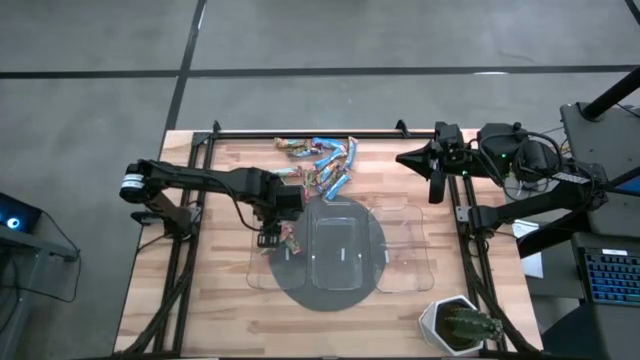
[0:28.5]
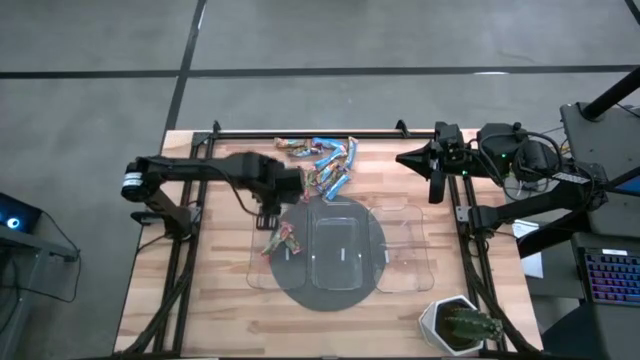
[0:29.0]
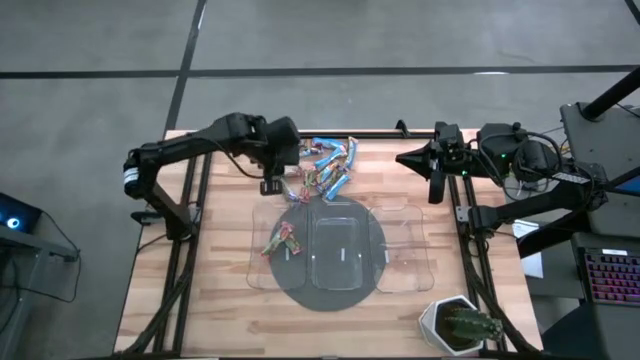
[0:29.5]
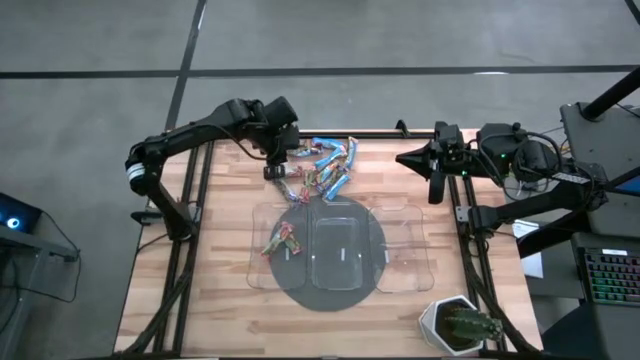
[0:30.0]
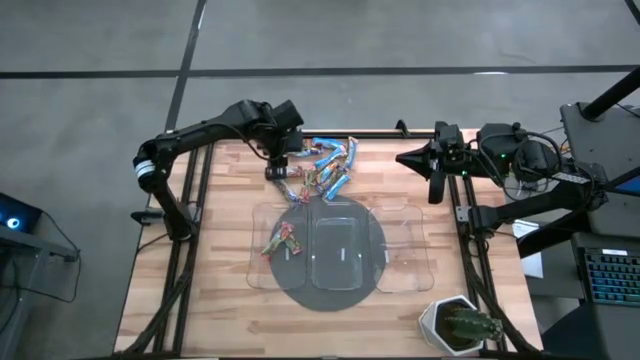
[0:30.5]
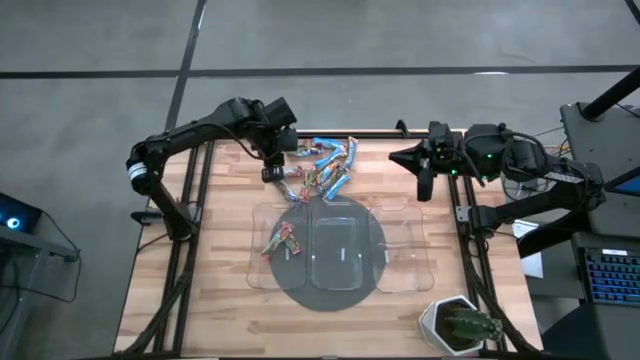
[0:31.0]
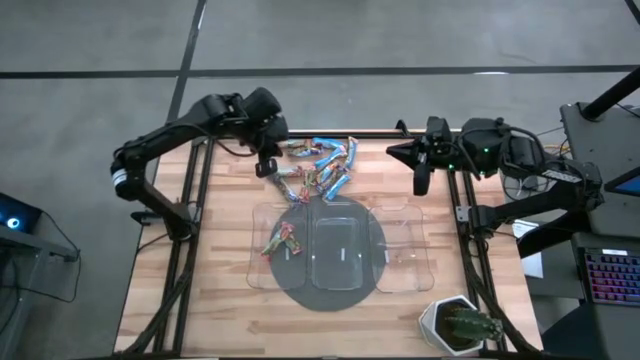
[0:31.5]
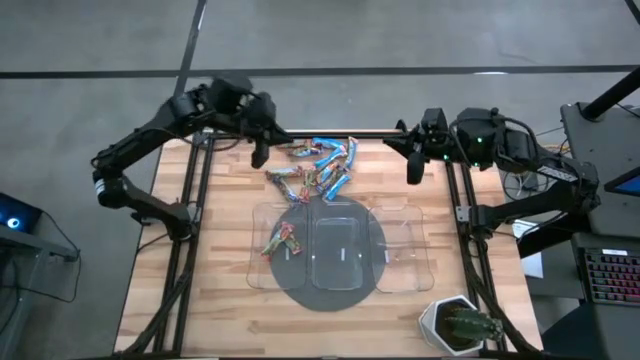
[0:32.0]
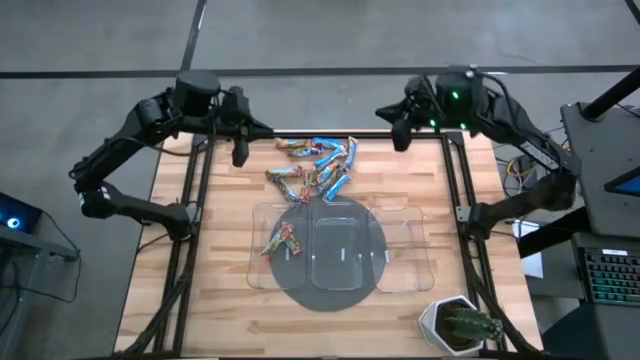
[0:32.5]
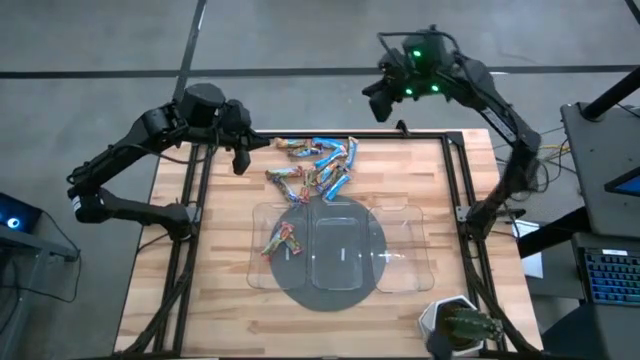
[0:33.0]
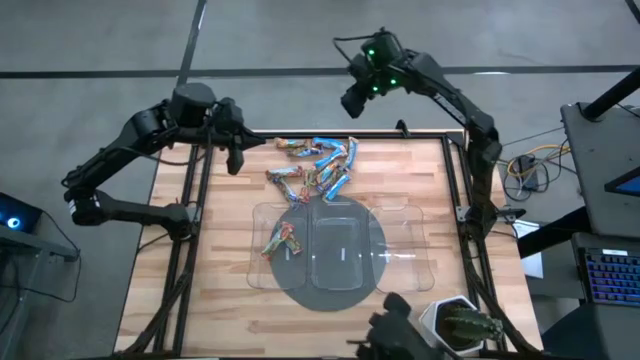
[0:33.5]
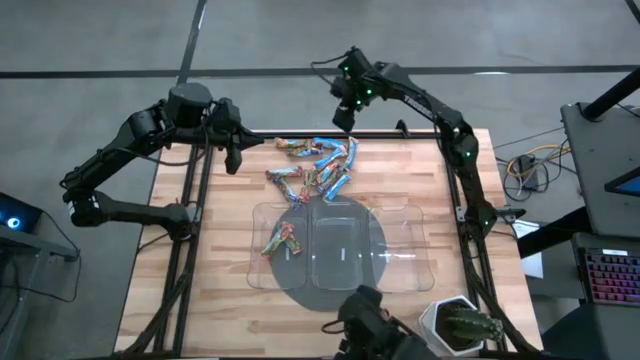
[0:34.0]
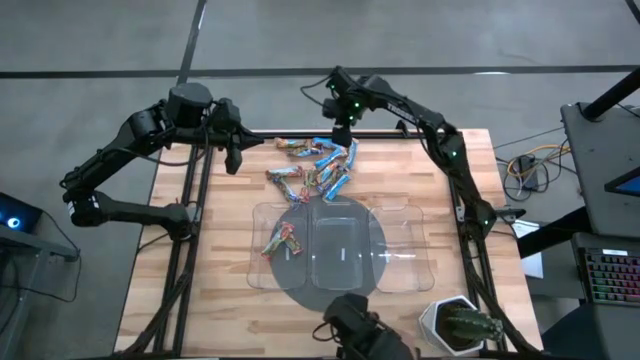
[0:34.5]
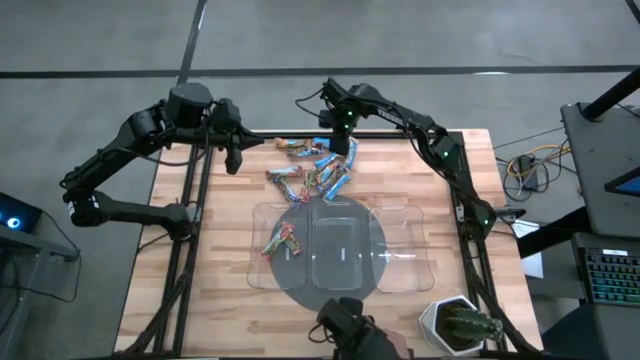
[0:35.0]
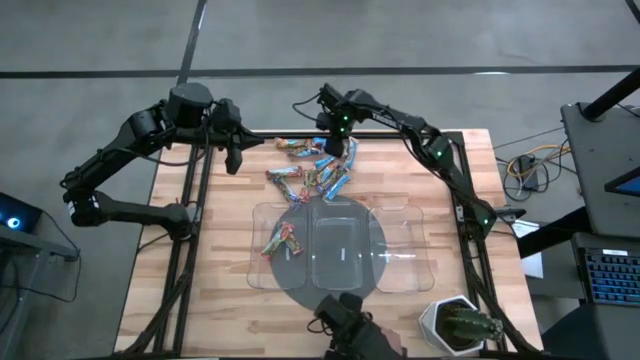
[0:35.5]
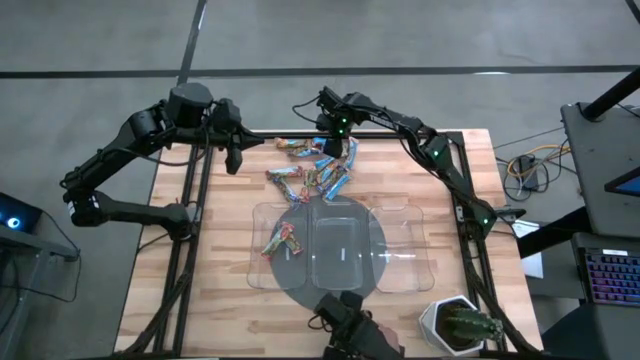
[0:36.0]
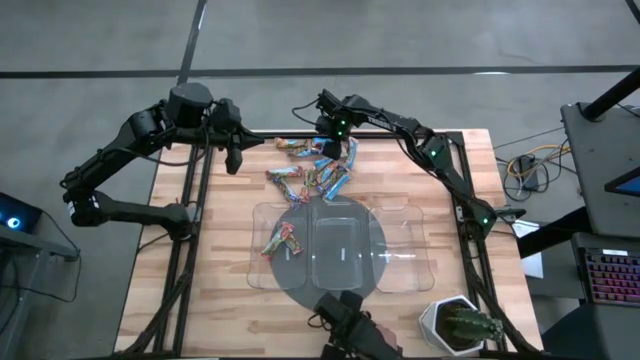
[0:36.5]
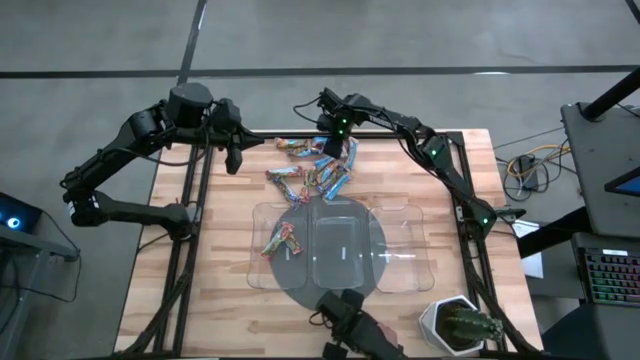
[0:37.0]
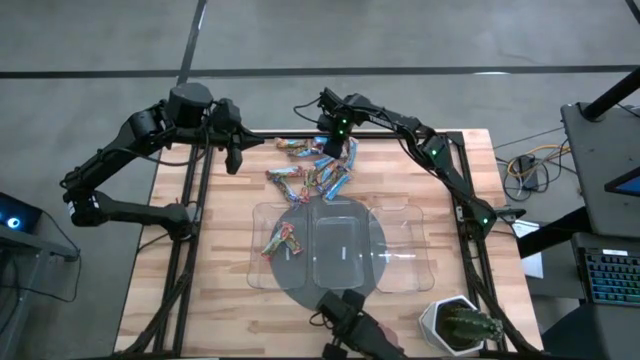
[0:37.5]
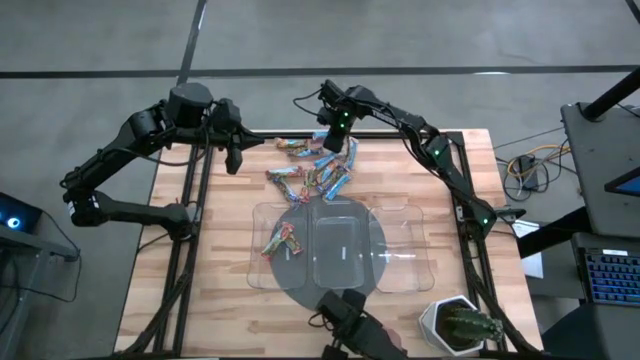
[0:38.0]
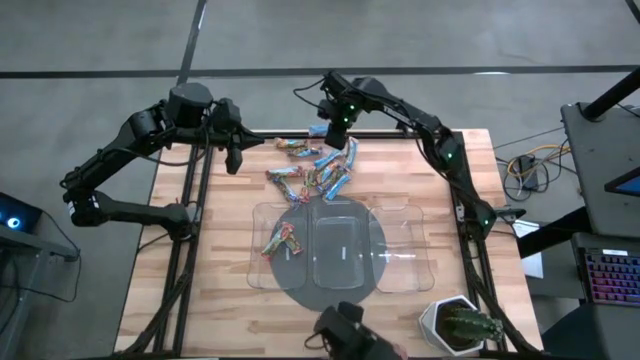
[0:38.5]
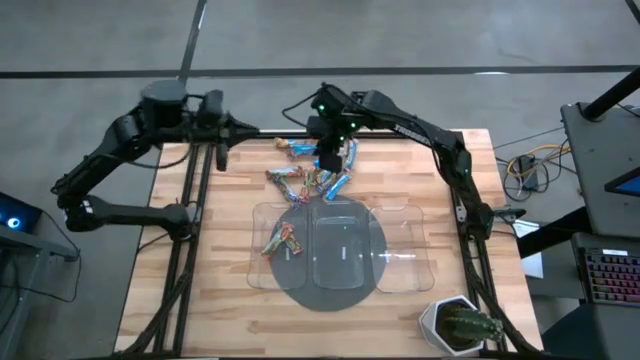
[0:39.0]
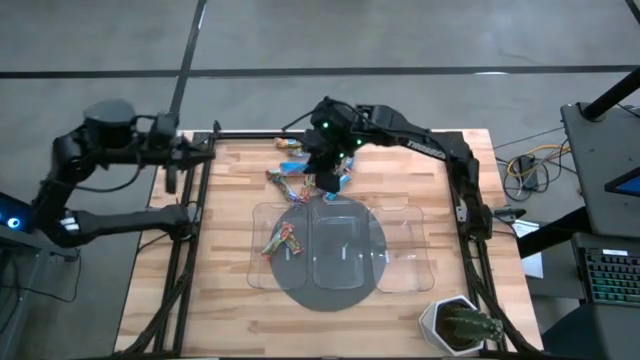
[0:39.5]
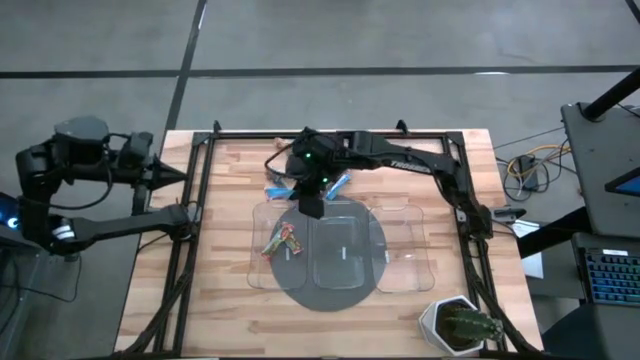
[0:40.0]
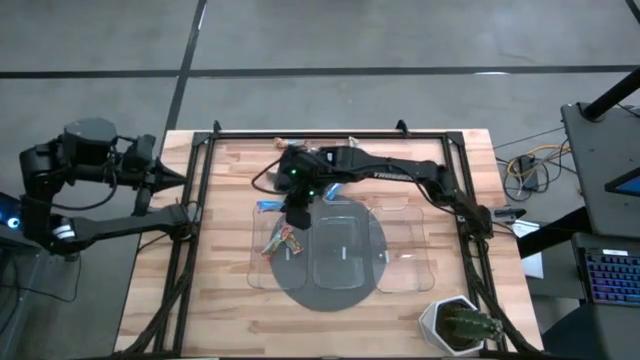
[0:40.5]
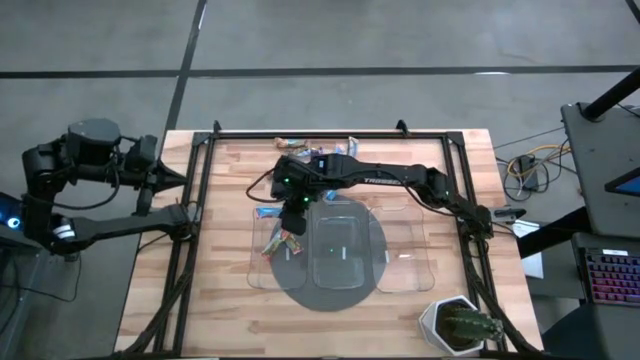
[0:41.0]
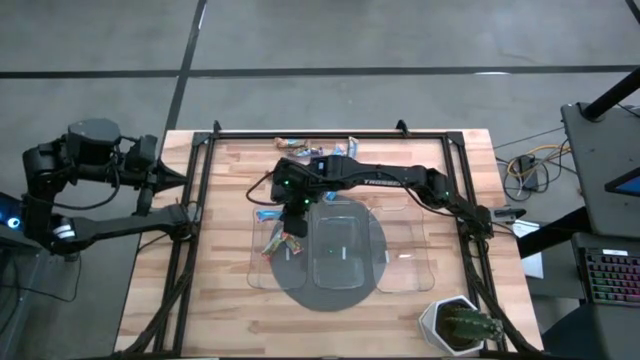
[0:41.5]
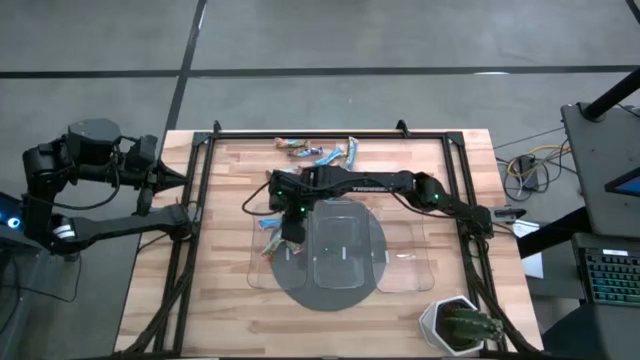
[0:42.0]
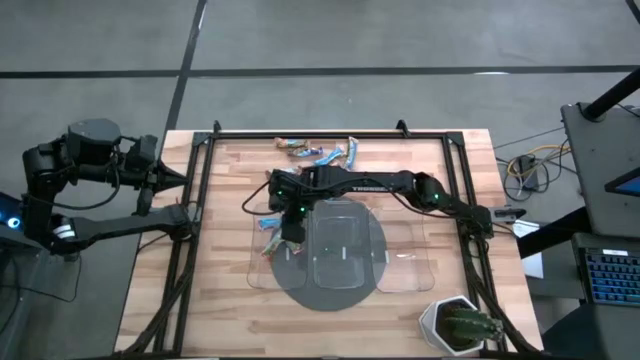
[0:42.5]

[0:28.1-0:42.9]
Task: Pick and place Granola Bars by type
Put the red granola bar into the left transparent bin
